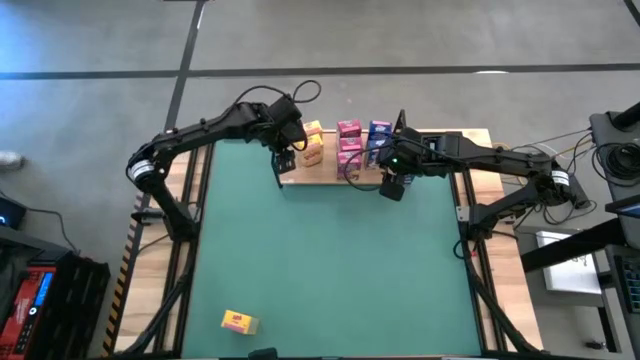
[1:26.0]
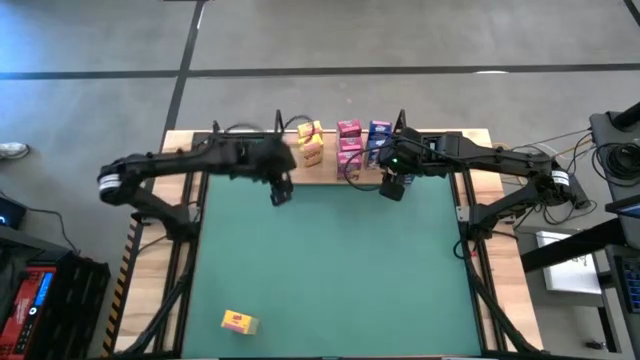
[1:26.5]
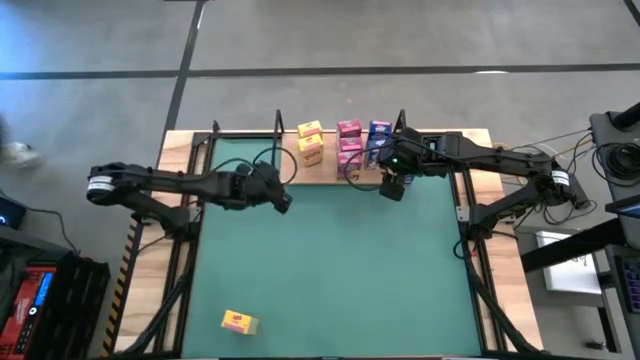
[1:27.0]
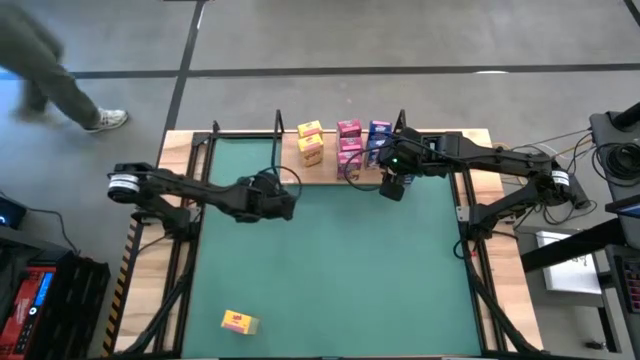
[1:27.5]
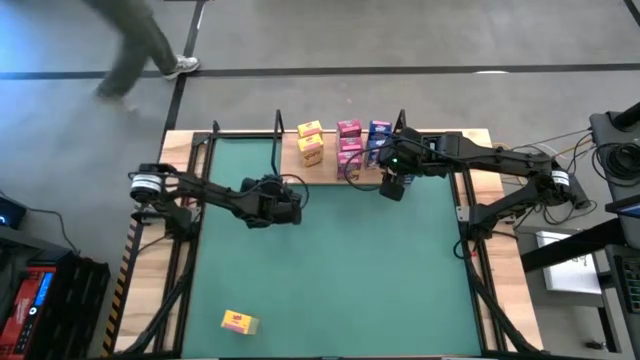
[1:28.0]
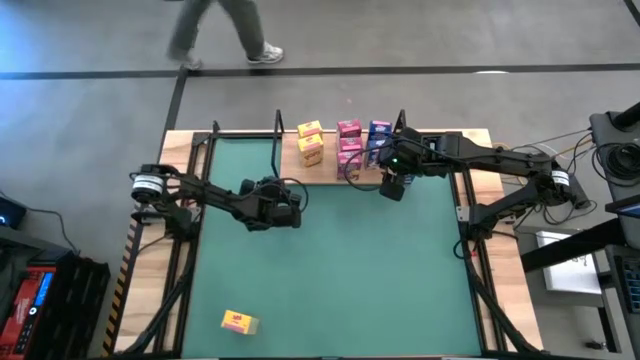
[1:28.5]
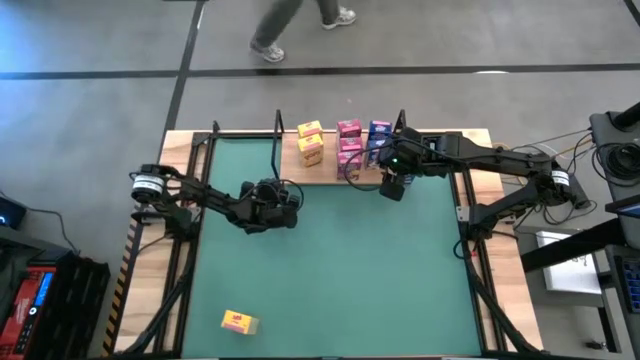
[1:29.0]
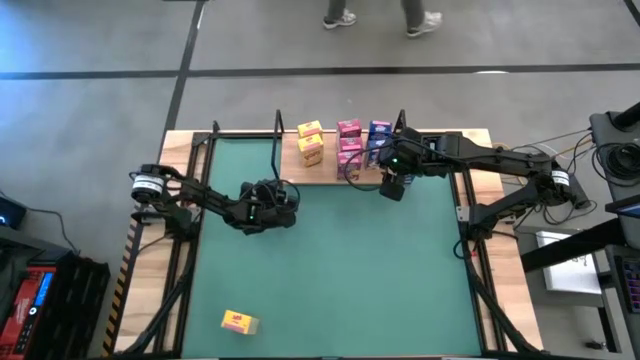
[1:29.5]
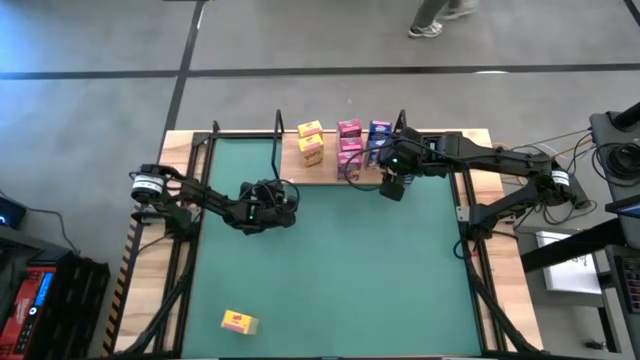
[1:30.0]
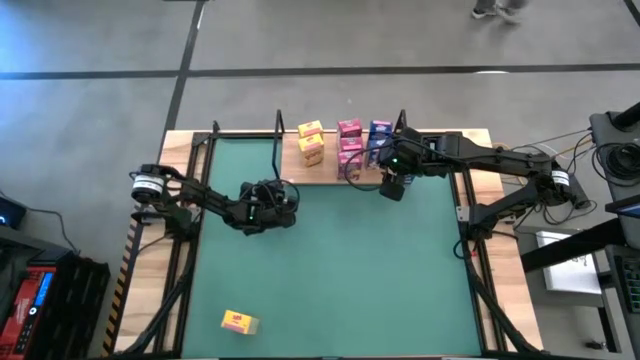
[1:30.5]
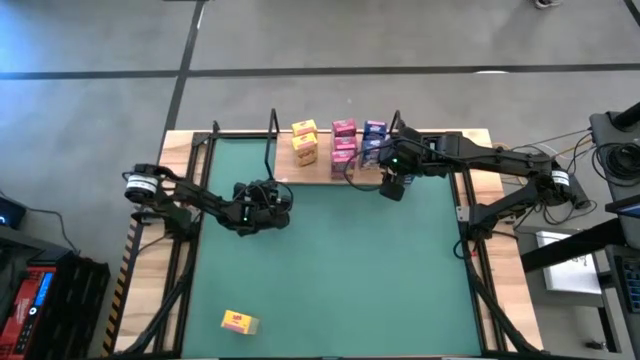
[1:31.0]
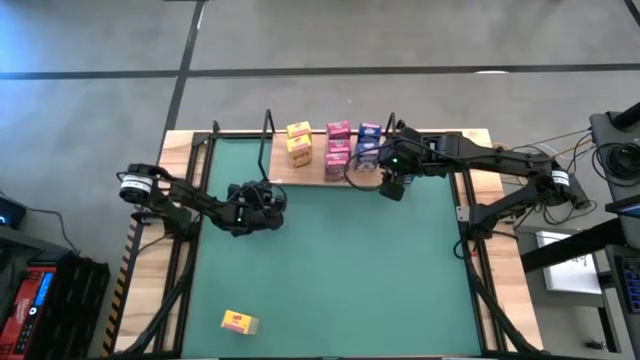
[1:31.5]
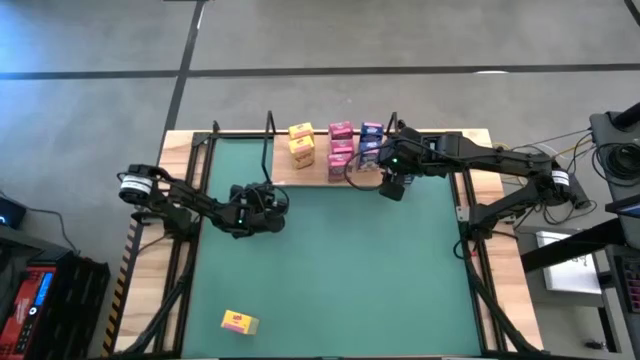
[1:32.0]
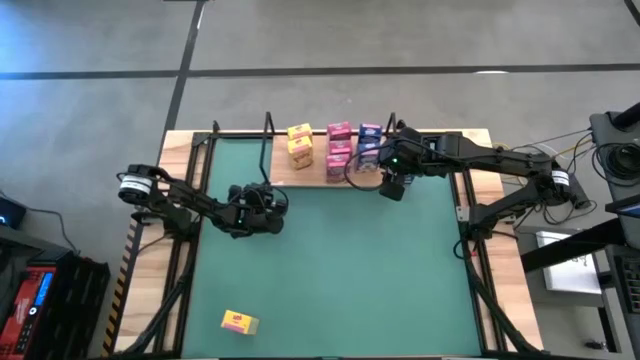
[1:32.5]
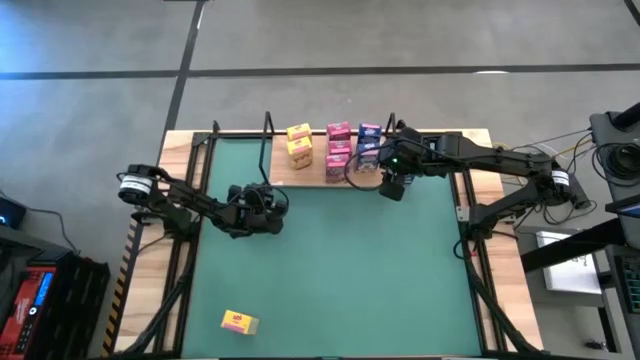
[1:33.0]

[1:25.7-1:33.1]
Task: Stack cereal on shelf
Adjust the shelf

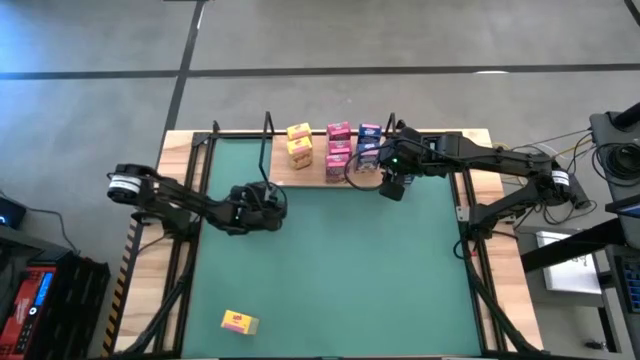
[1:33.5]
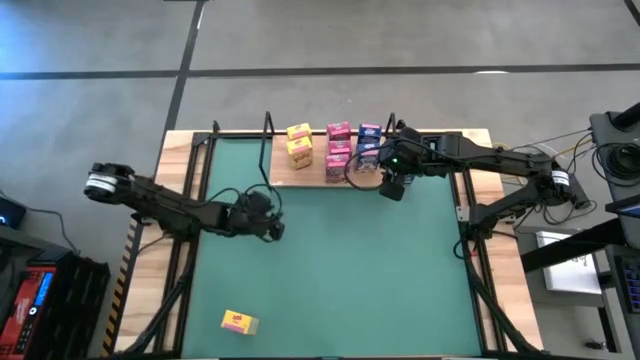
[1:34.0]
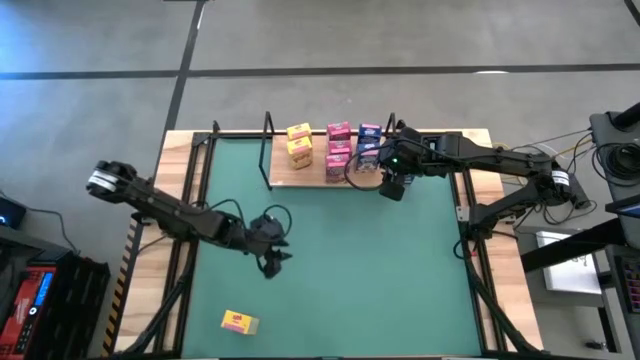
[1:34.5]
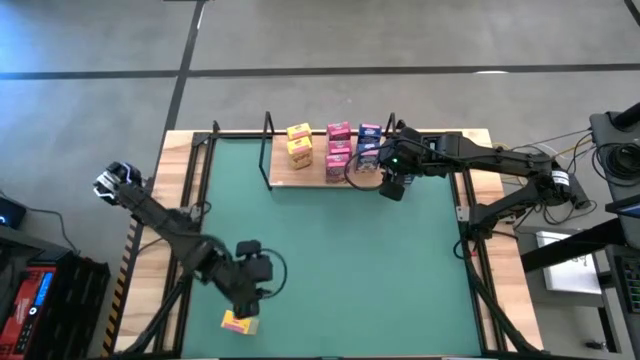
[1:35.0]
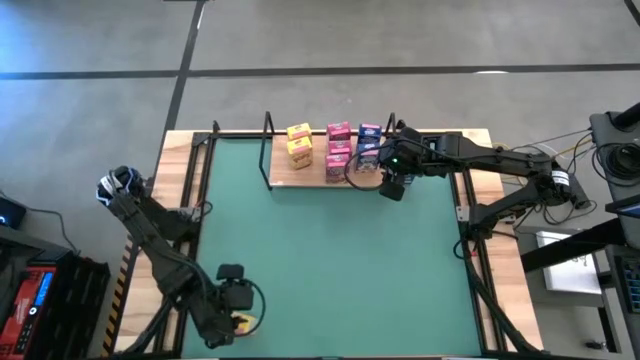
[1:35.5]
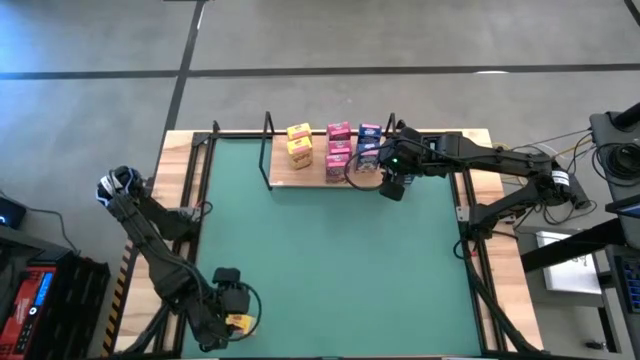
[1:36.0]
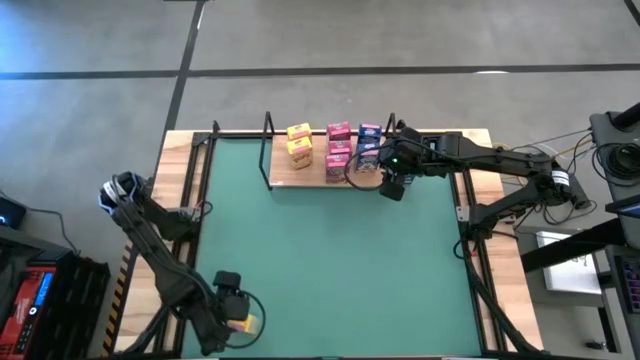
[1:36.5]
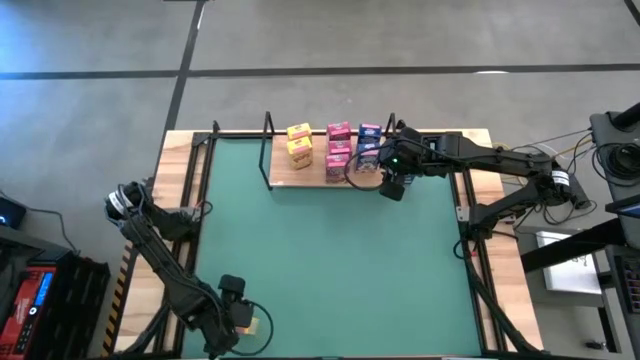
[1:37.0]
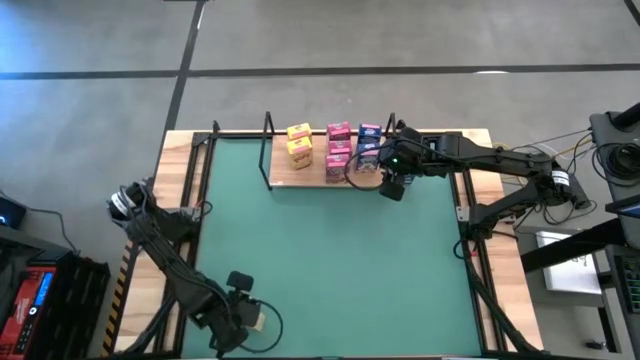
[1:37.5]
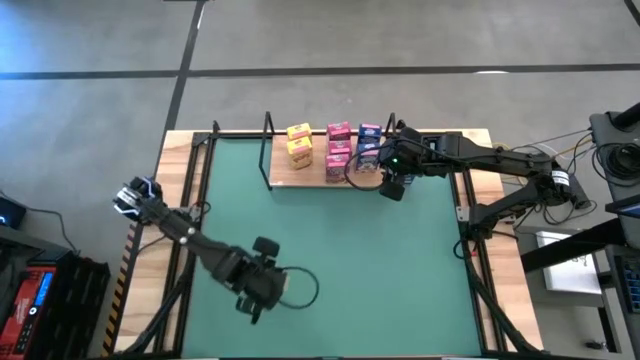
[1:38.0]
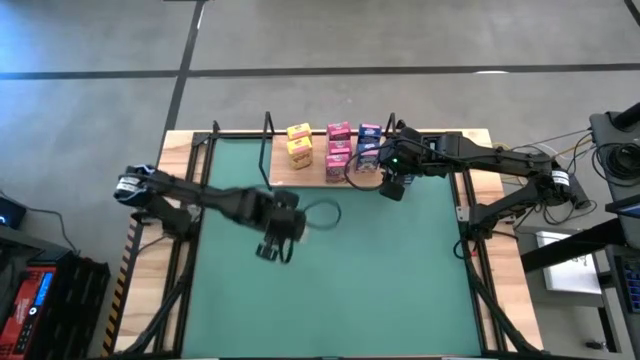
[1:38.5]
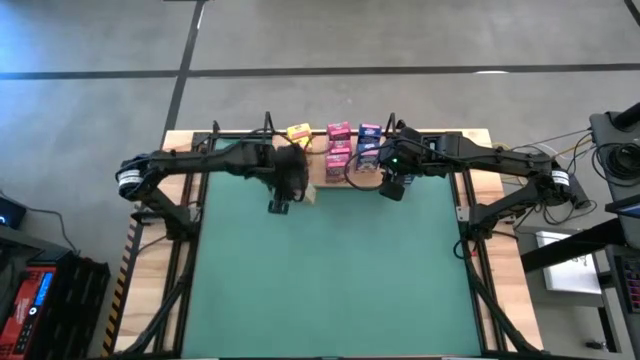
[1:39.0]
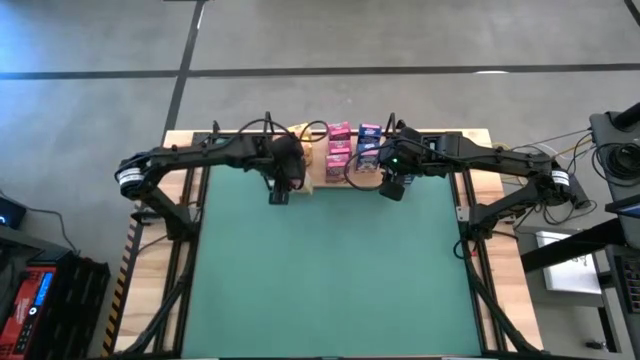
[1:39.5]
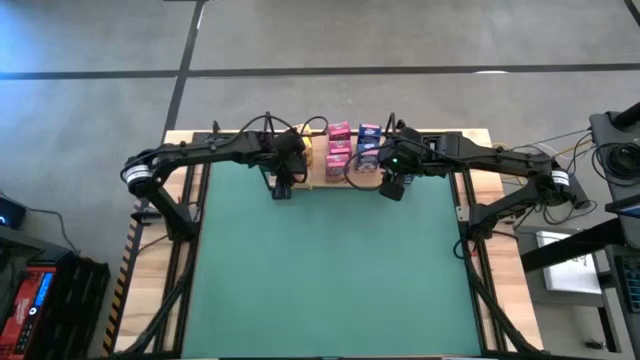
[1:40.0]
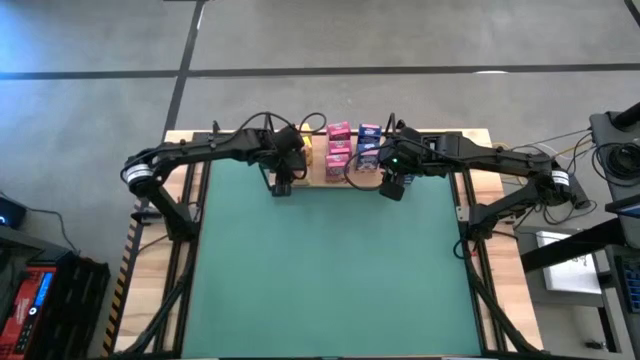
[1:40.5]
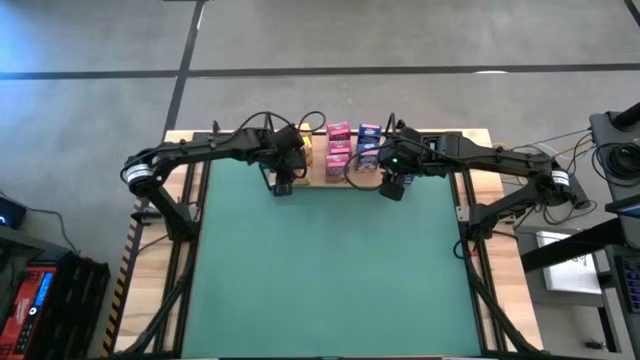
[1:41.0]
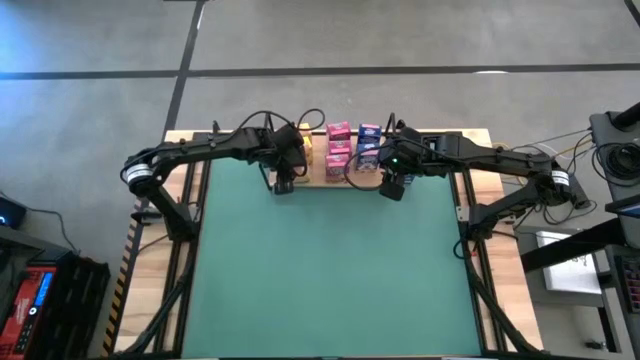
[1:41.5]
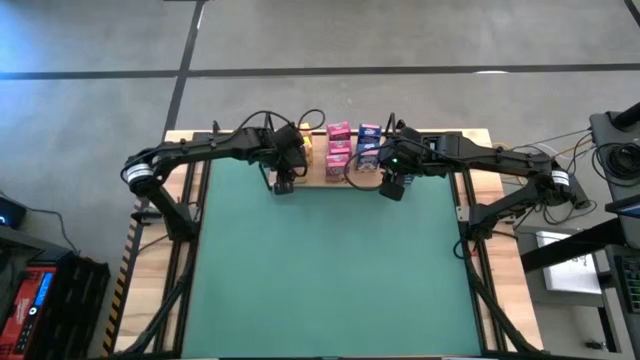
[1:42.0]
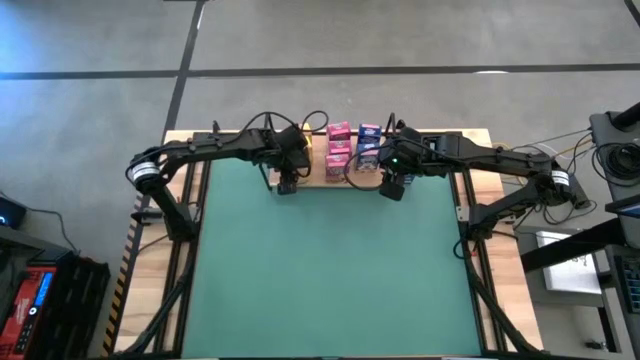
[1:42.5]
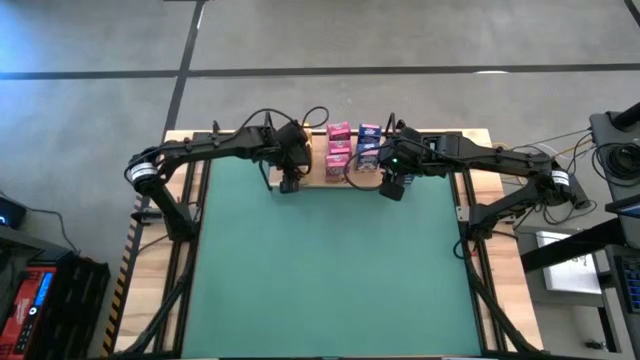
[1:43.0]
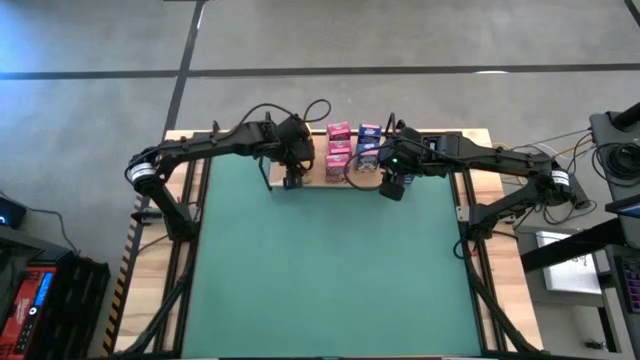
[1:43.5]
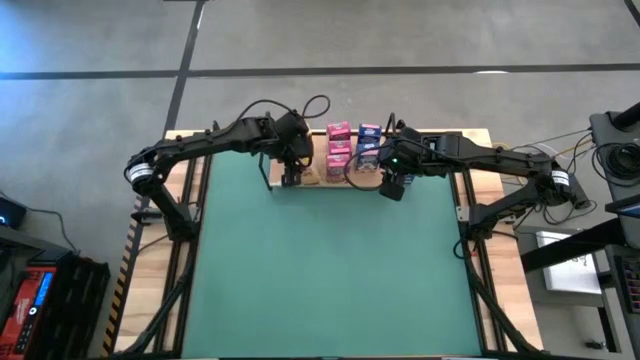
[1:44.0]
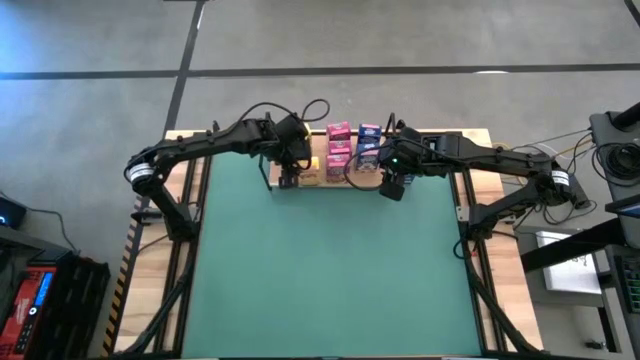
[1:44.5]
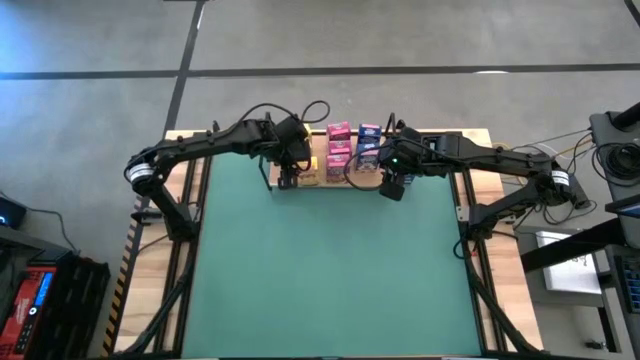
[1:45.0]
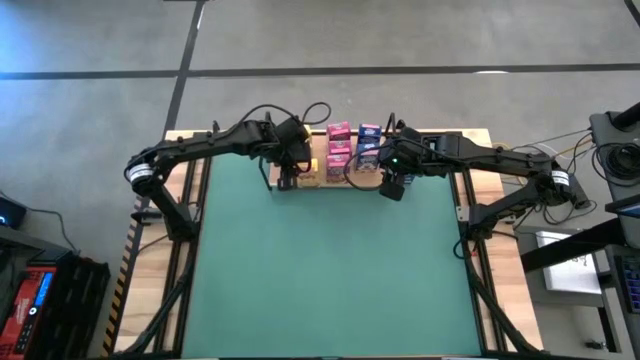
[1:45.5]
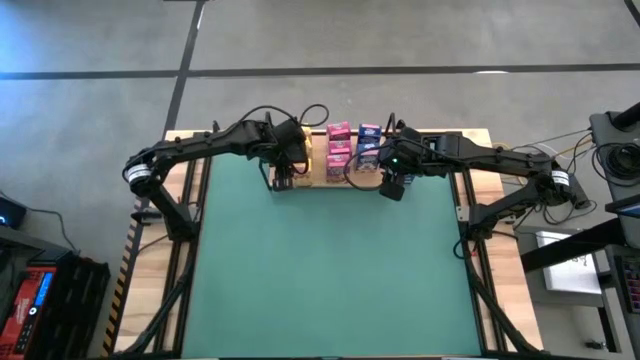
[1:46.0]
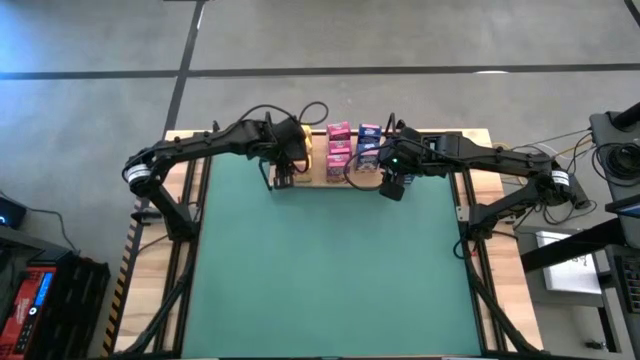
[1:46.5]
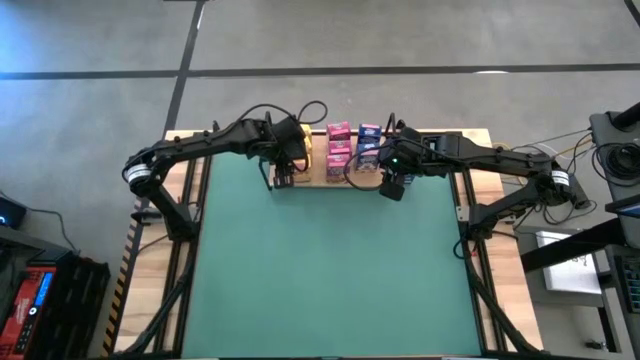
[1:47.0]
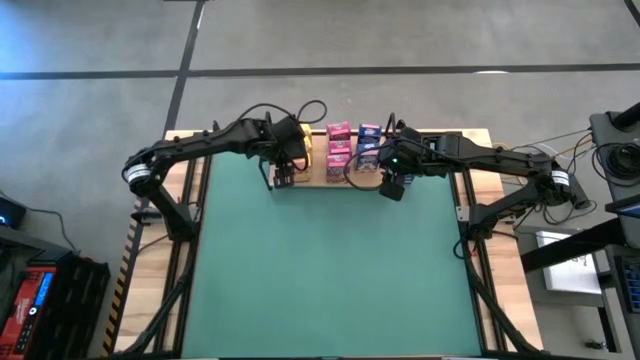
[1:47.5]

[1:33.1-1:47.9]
Put the yellow cereal box on the shelf and align with the other yellow cereal boxes
